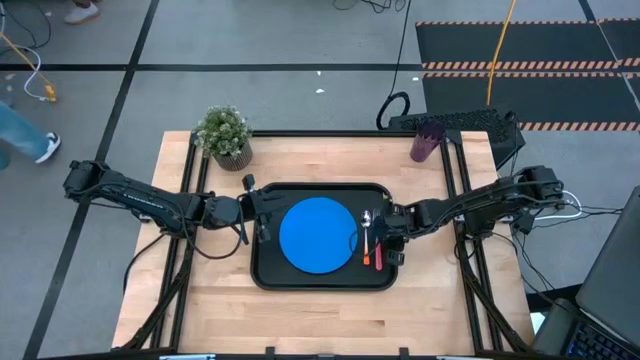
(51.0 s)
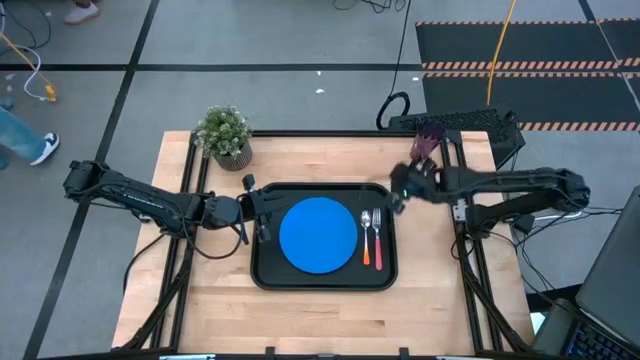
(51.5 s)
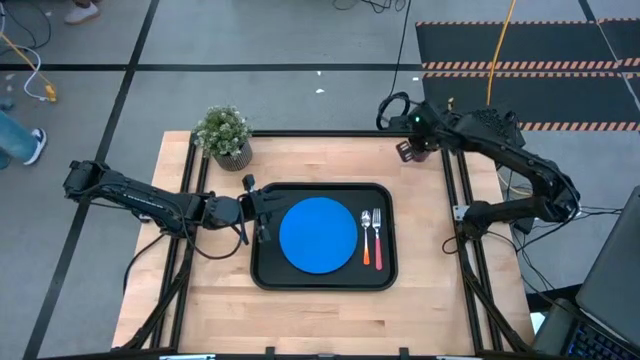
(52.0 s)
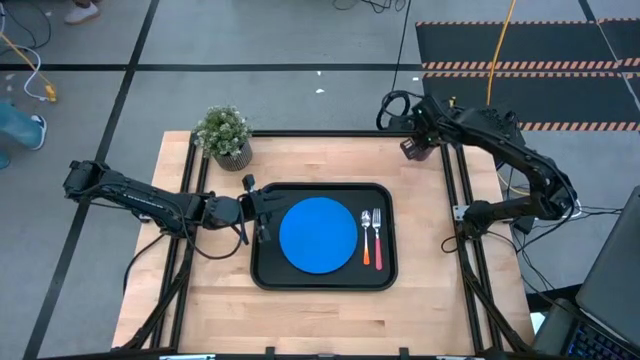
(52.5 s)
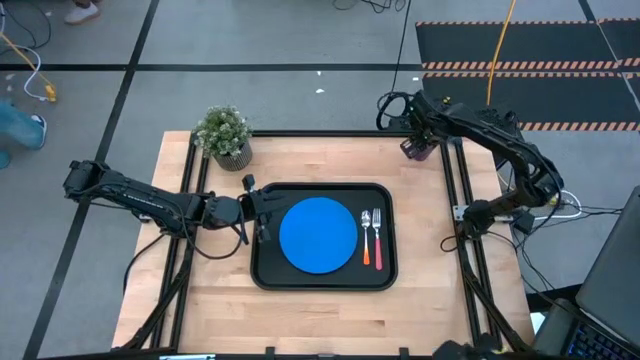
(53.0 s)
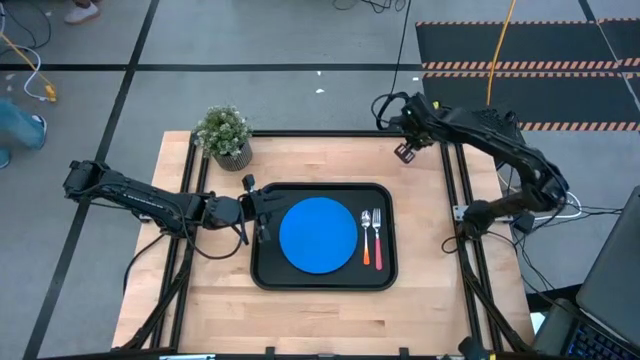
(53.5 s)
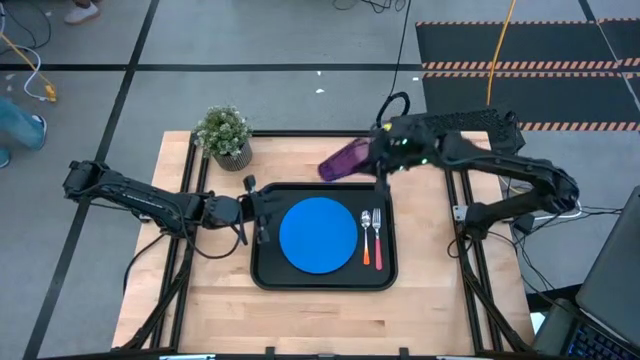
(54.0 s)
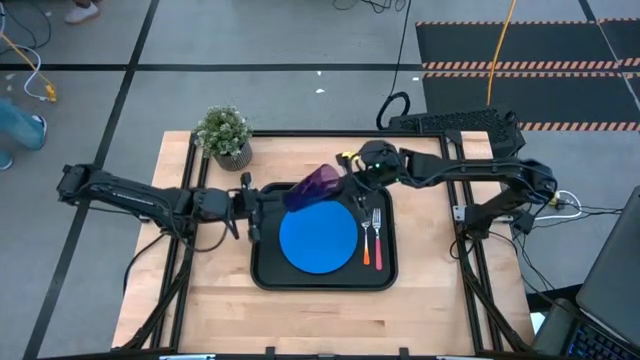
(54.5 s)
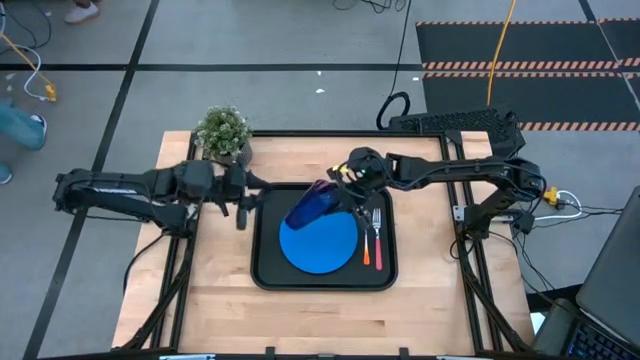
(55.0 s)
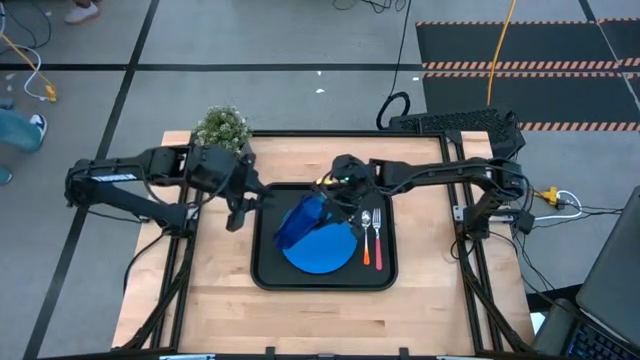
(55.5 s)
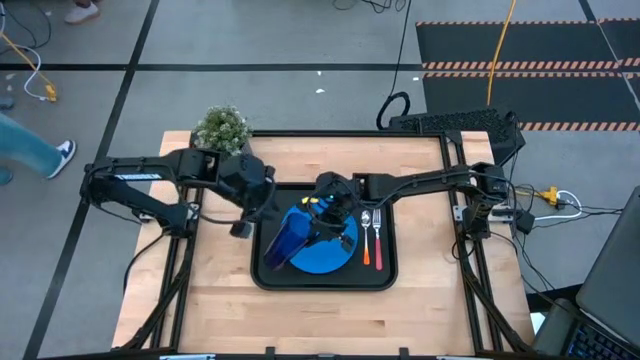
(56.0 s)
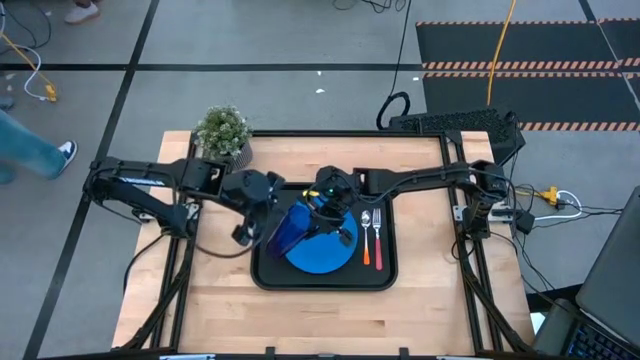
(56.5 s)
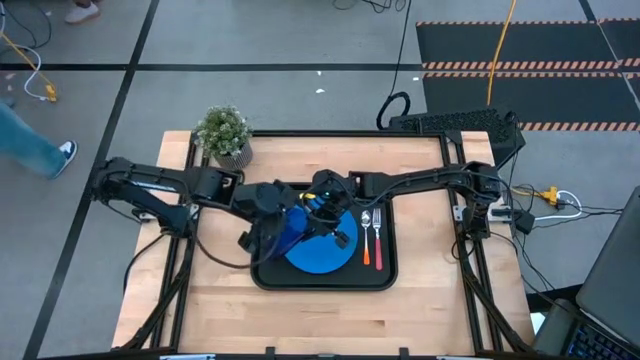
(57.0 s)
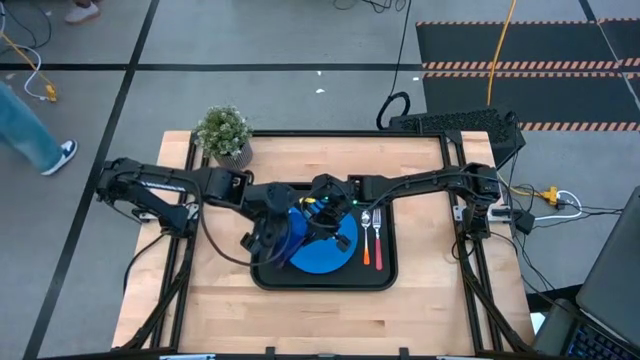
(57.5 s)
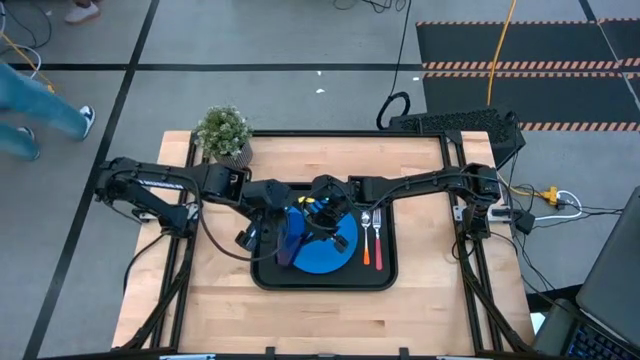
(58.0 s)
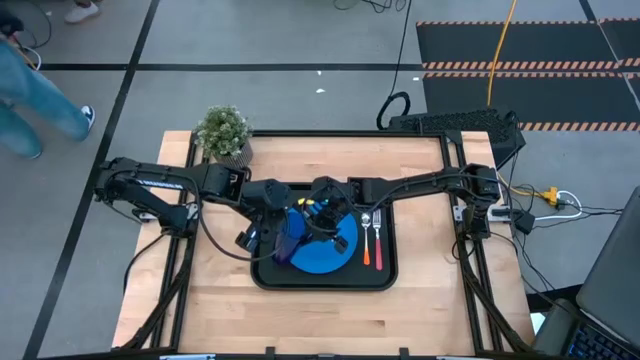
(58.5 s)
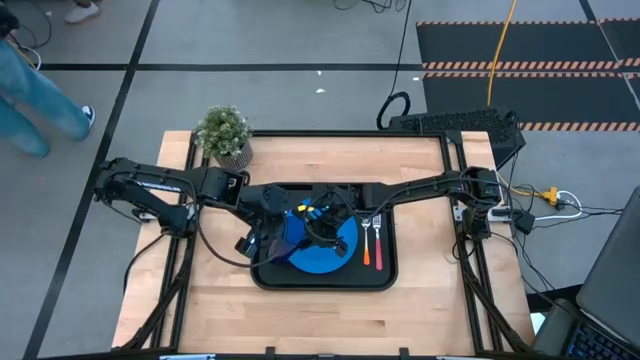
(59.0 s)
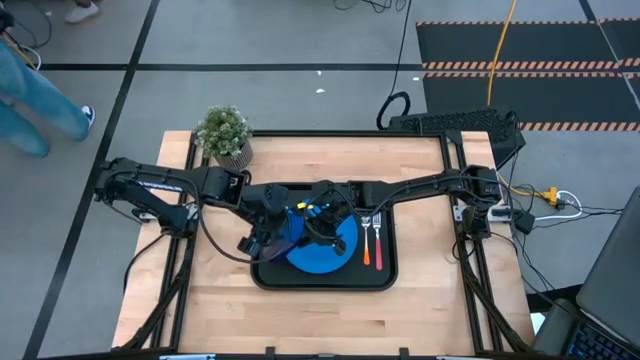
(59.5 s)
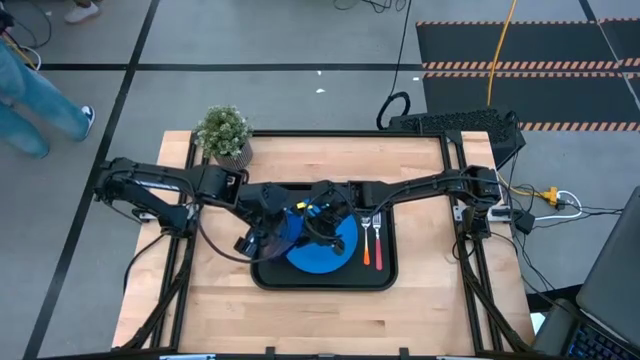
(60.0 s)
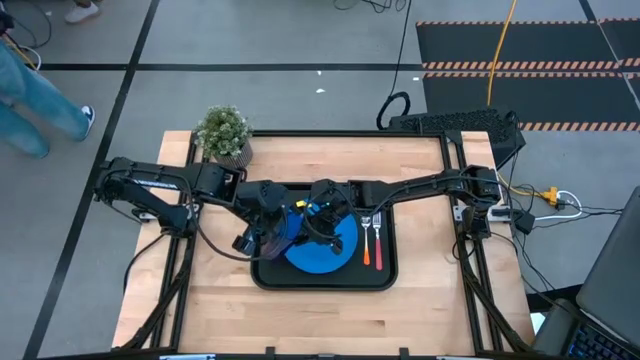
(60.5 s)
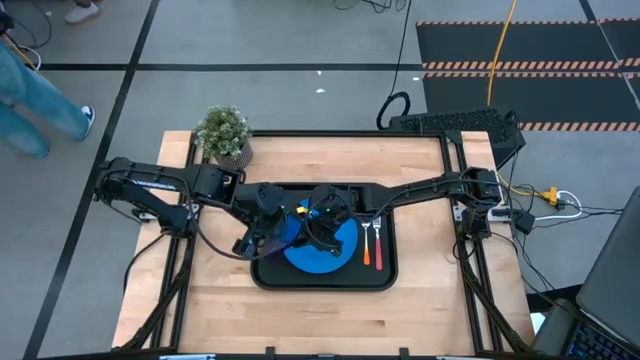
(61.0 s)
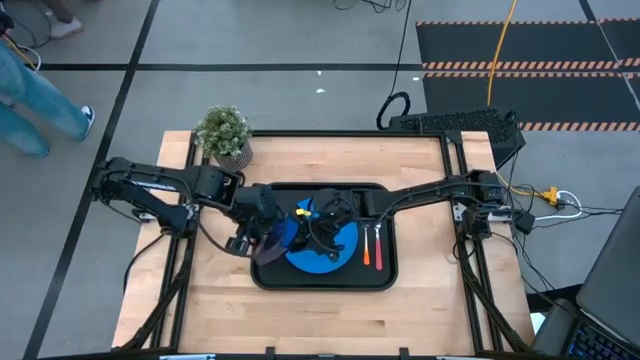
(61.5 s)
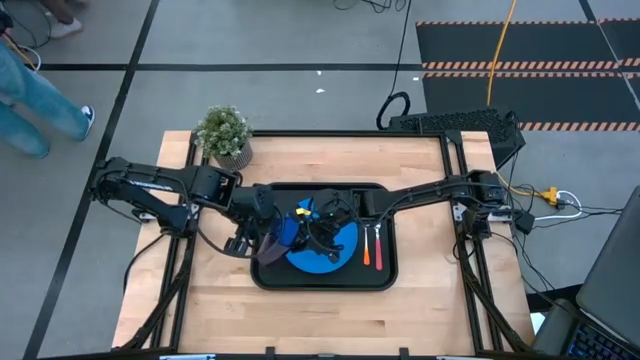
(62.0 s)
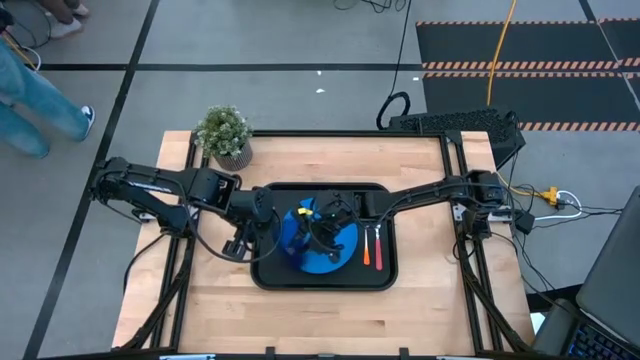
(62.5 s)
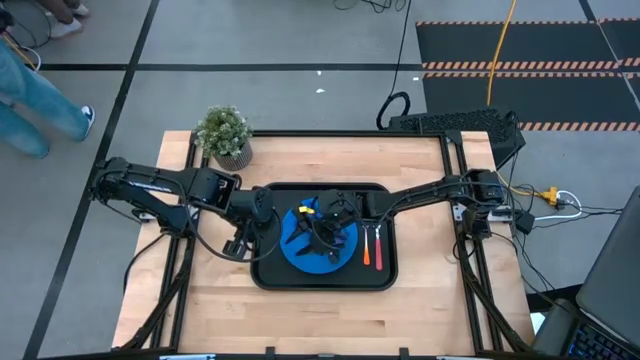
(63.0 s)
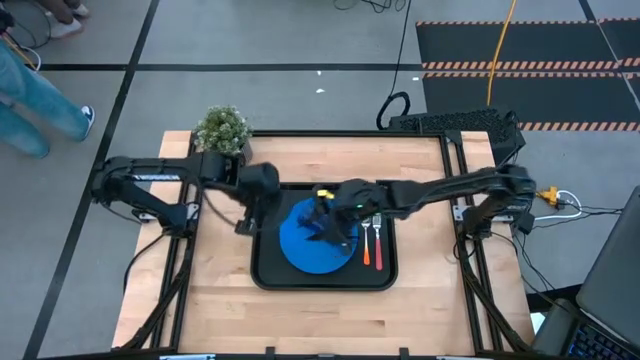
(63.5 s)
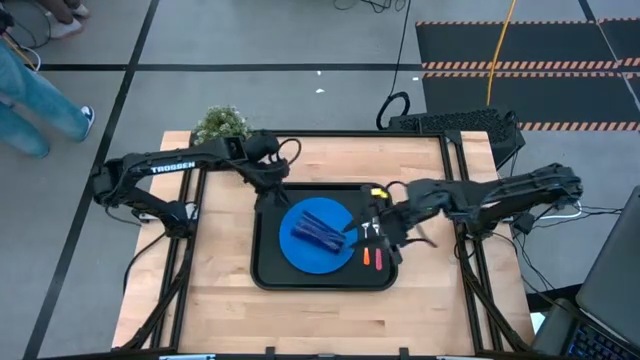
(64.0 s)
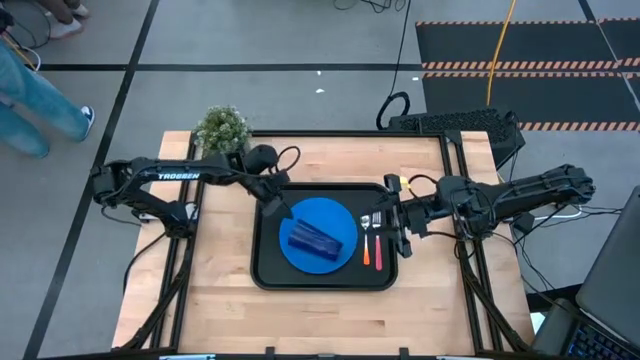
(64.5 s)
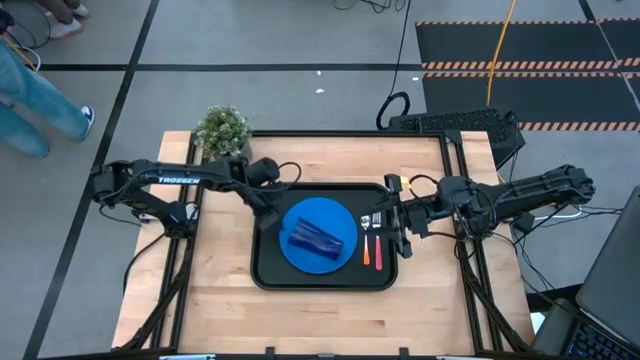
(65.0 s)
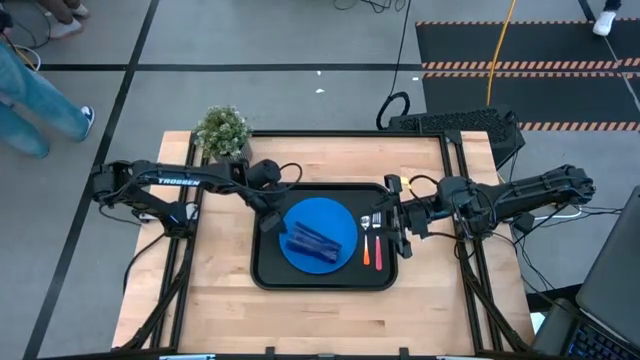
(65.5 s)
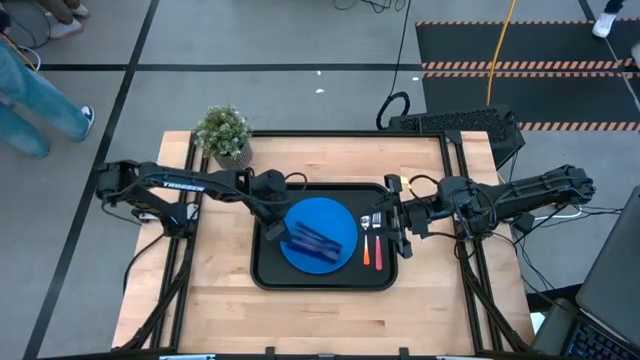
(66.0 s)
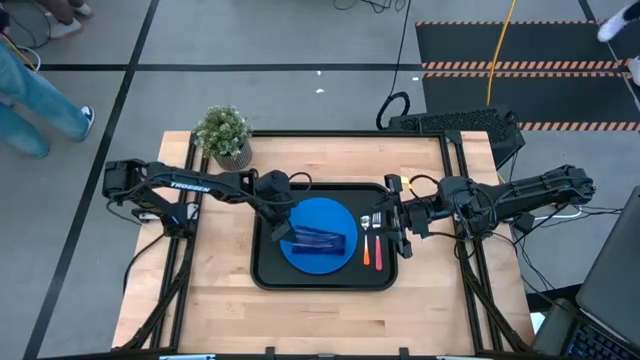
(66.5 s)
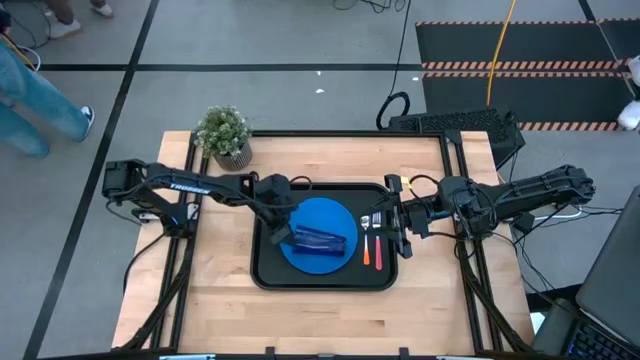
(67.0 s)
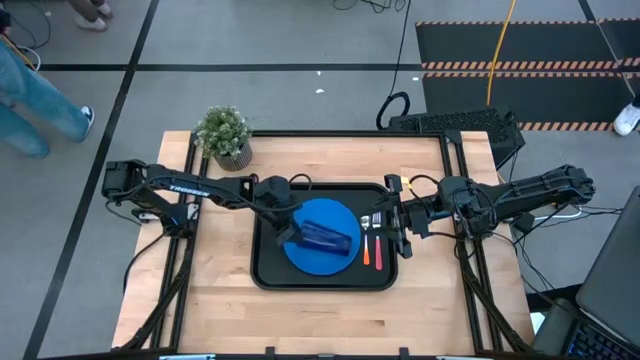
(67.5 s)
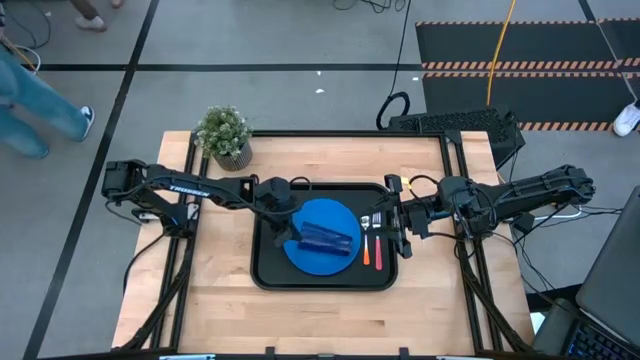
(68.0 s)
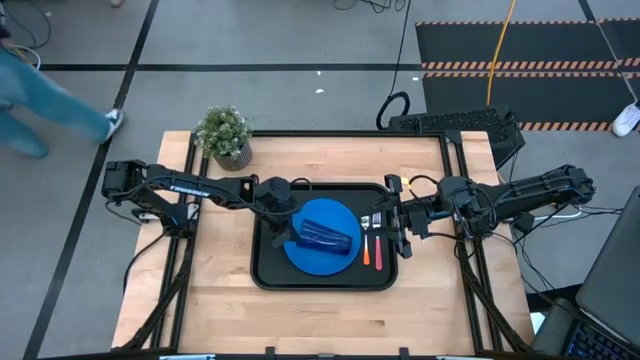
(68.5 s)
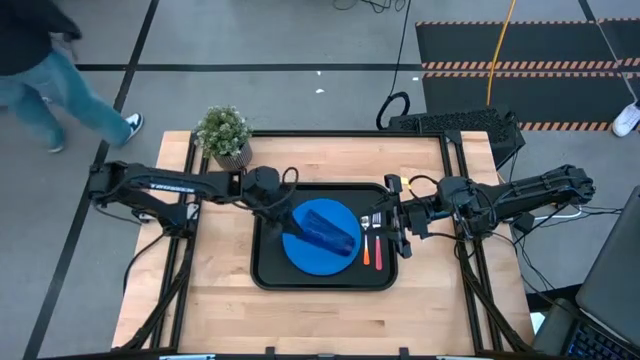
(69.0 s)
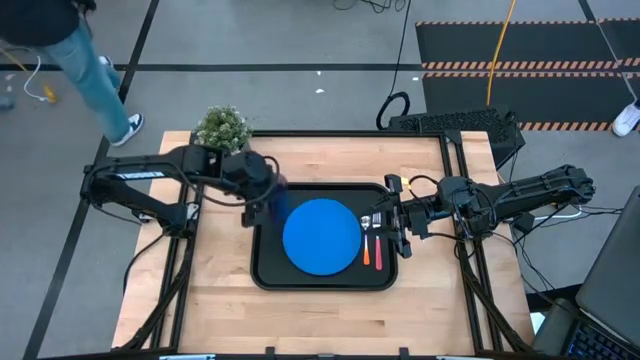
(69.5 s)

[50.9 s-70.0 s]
Task: Pick and place plate/cup/fork/spoon on tray
Put the violet cup on the black tray to the upper left of the blue plate
